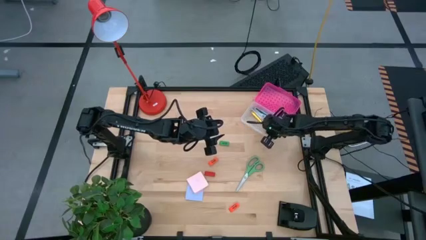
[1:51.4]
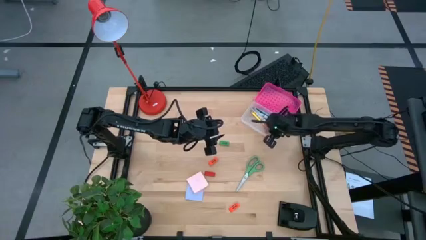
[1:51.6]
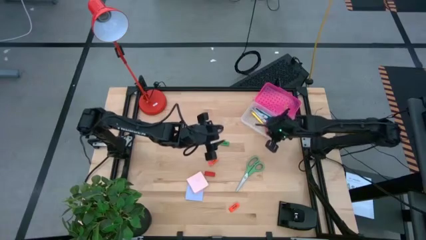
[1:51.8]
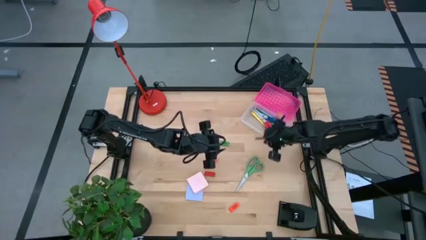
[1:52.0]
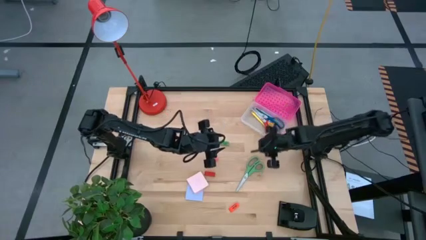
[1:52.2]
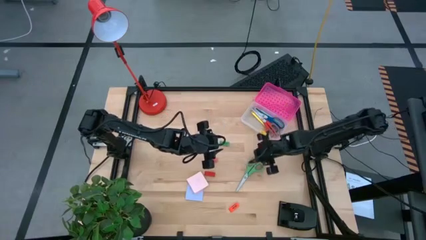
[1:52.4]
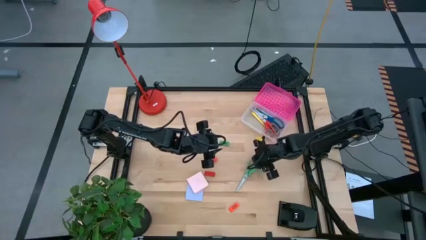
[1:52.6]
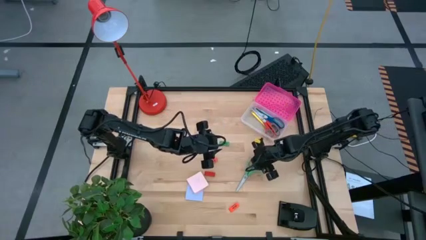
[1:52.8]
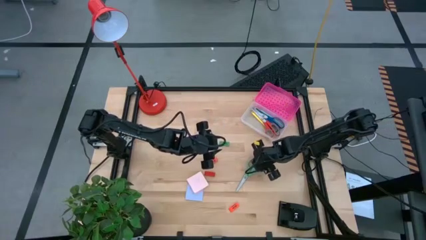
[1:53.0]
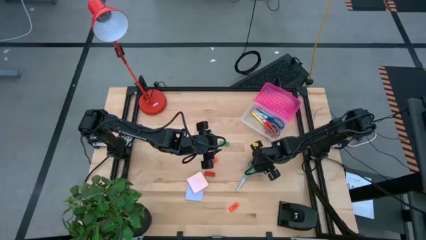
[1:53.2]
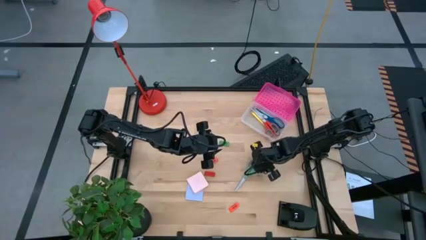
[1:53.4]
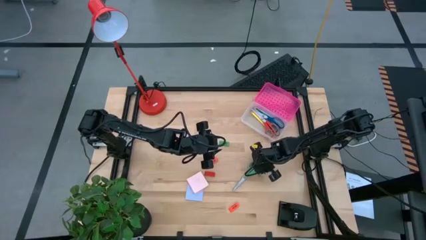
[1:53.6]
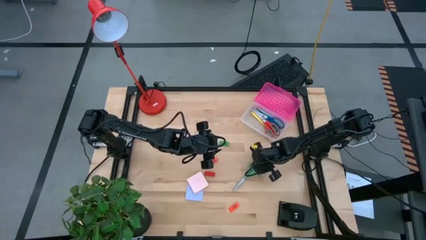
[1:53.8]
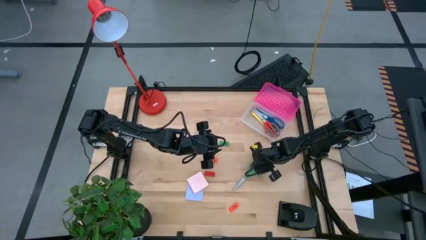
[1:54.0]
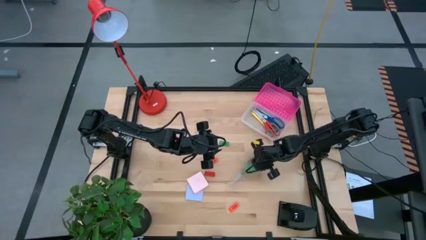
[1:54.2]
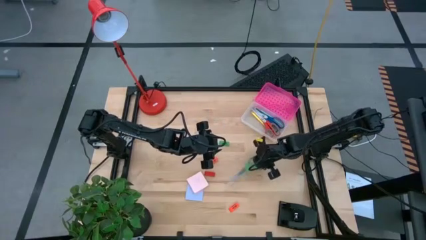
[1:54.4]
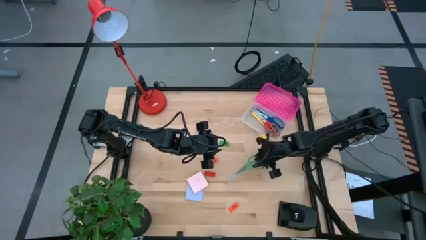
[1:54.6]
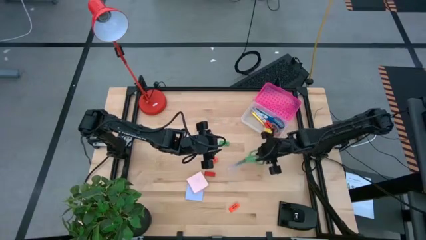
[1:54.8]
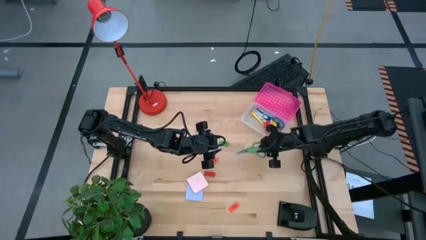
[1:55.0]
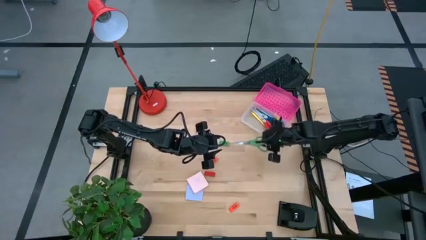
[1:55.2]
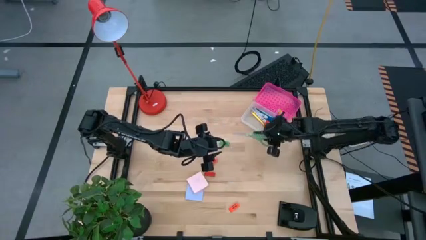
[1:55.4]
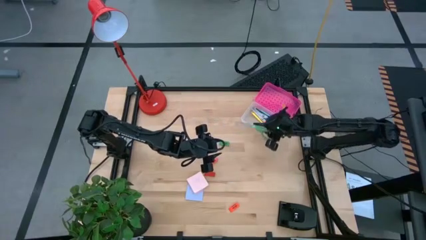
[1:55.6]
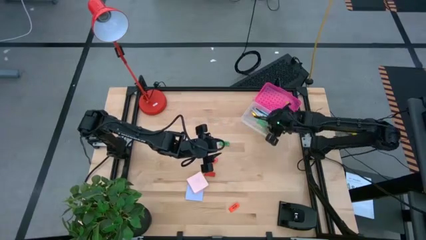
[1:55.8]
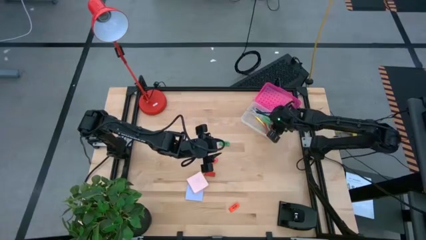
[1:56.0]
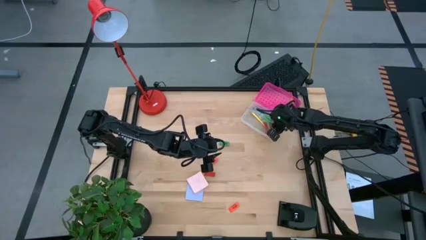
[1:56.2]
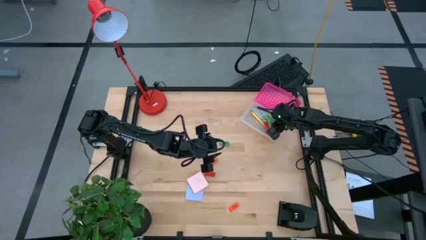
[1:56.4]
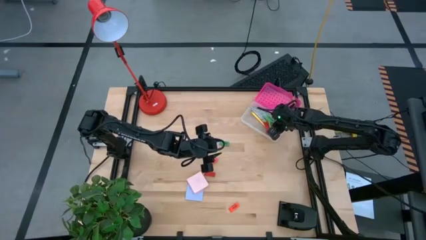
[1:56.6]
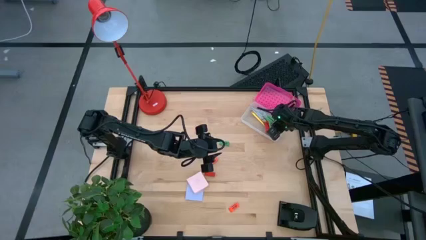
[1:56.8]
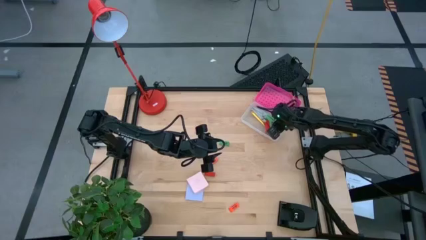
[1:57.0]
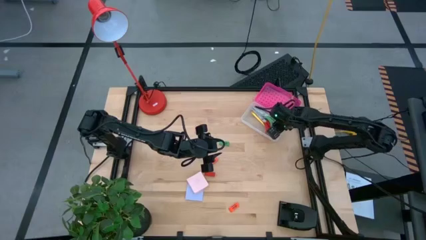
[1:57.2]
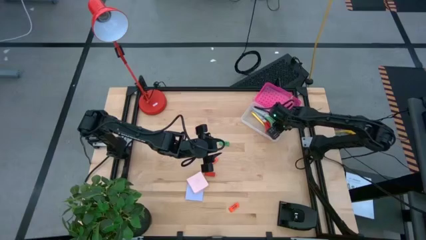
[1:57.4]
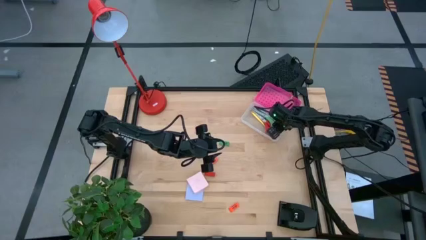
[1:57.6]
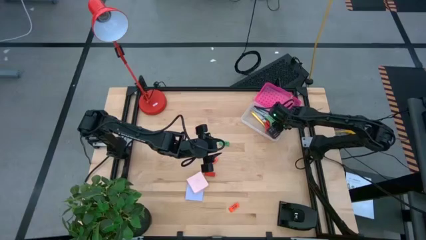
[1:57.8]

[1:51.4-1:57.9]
Task: Pack school essentials
Put the green scissors into the supply box

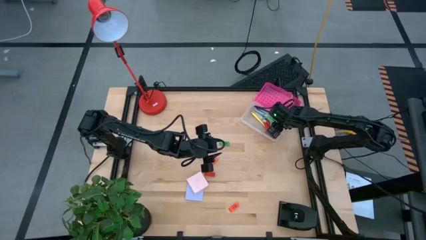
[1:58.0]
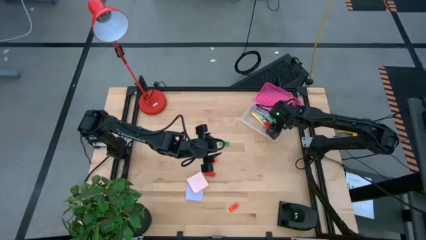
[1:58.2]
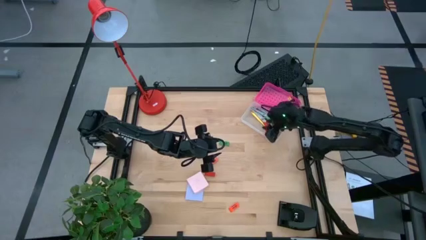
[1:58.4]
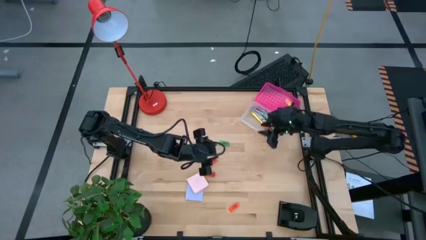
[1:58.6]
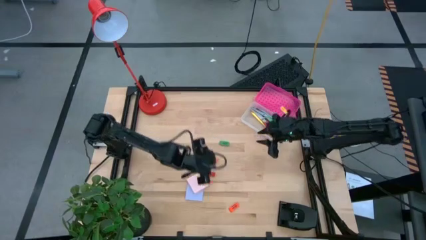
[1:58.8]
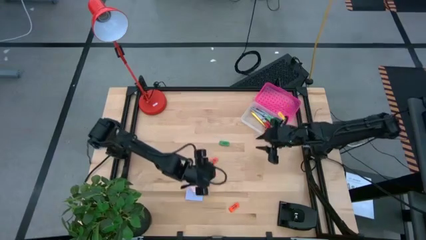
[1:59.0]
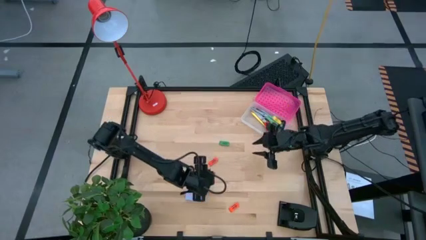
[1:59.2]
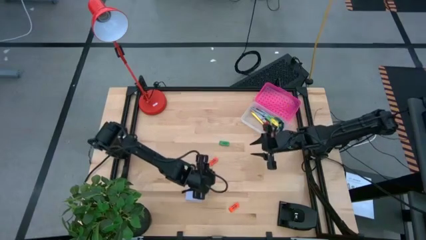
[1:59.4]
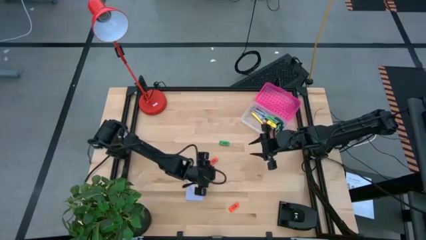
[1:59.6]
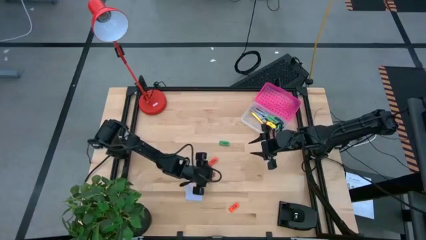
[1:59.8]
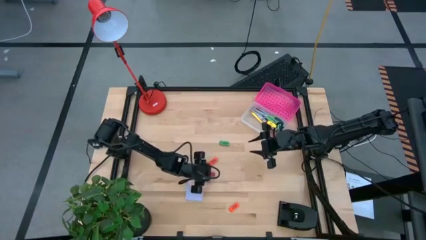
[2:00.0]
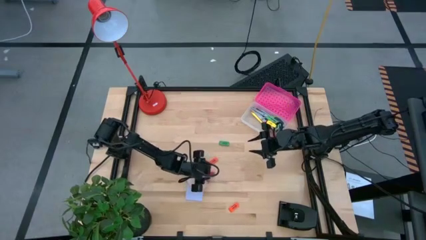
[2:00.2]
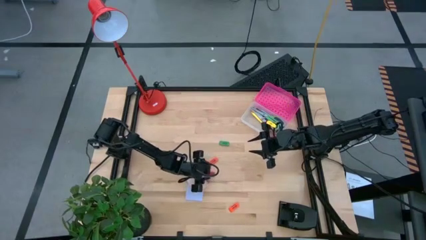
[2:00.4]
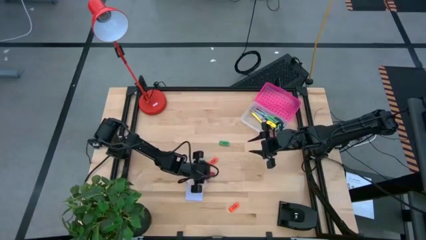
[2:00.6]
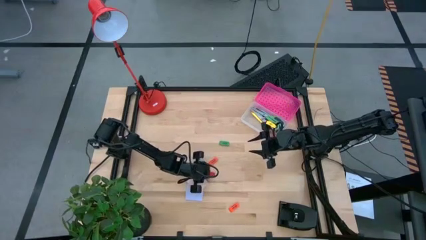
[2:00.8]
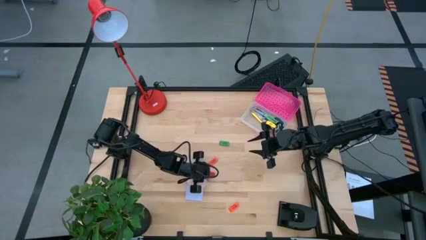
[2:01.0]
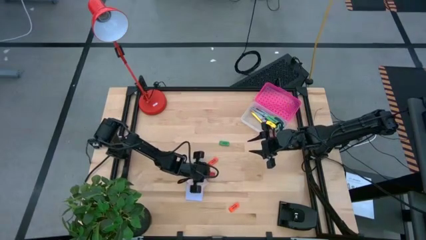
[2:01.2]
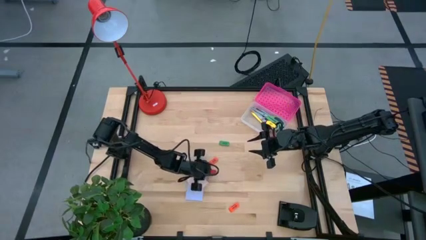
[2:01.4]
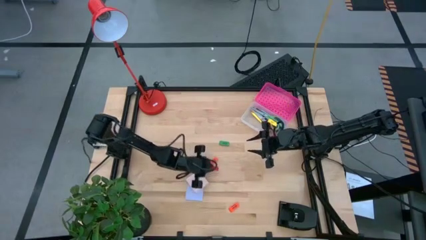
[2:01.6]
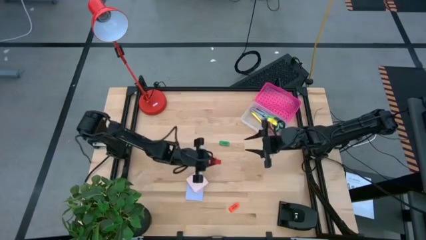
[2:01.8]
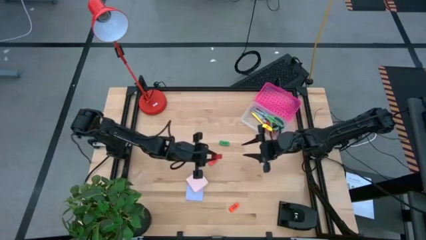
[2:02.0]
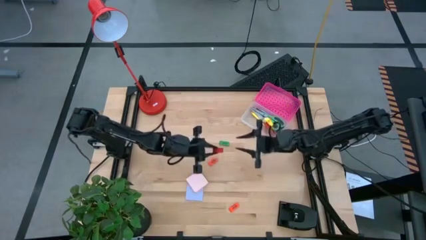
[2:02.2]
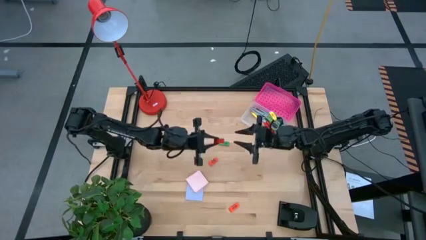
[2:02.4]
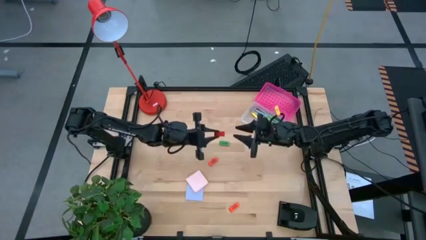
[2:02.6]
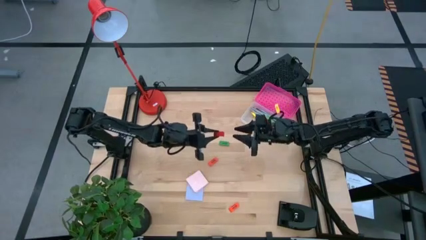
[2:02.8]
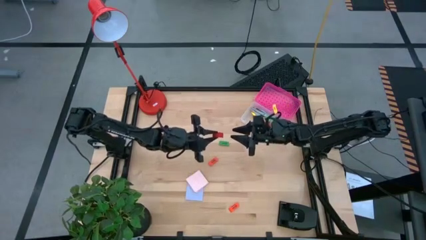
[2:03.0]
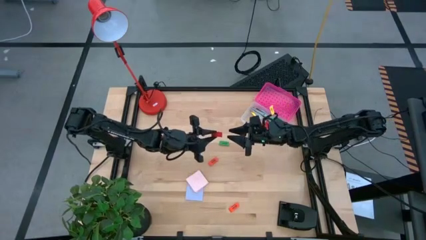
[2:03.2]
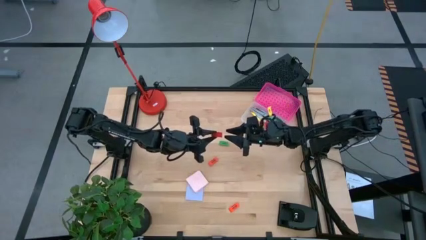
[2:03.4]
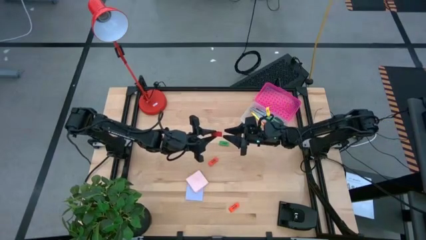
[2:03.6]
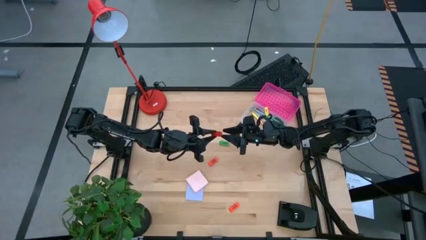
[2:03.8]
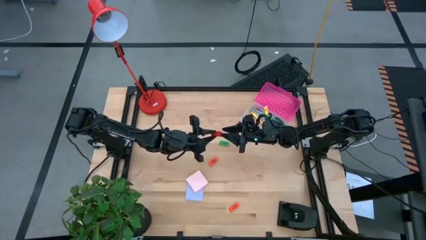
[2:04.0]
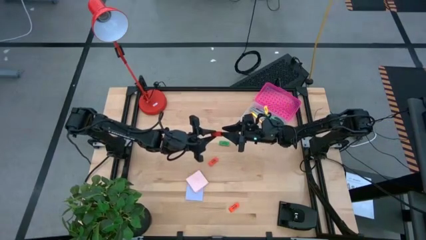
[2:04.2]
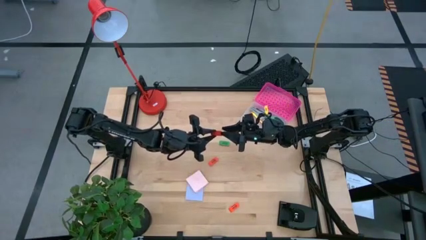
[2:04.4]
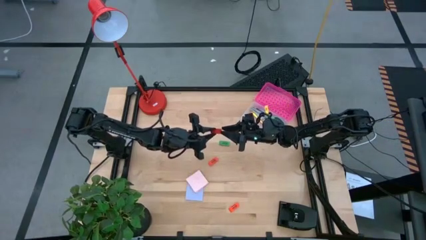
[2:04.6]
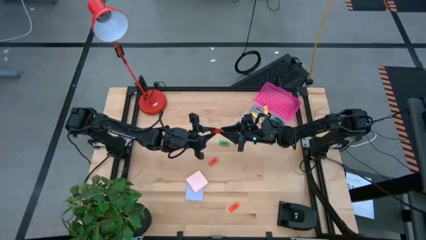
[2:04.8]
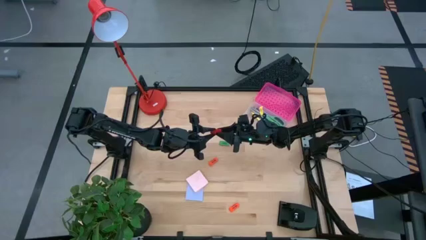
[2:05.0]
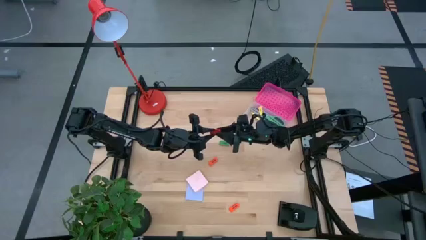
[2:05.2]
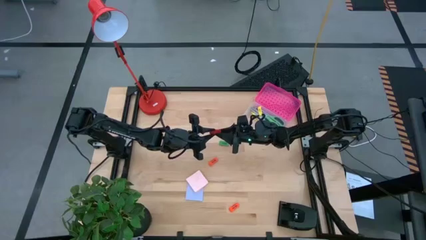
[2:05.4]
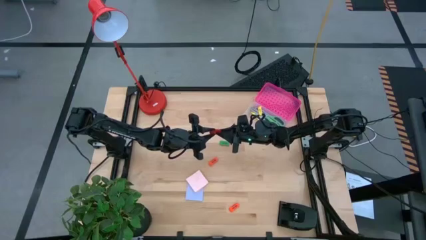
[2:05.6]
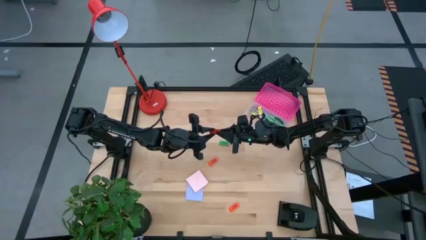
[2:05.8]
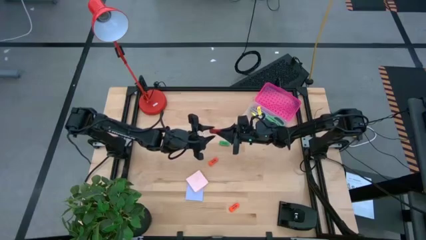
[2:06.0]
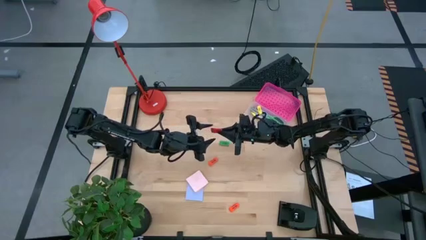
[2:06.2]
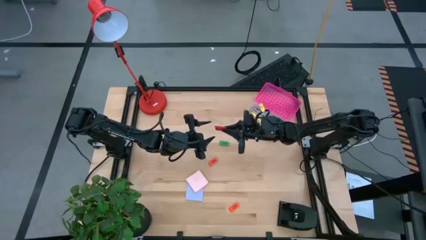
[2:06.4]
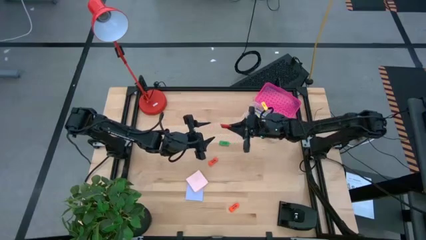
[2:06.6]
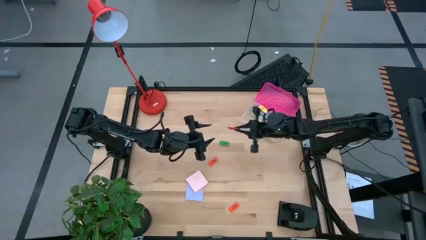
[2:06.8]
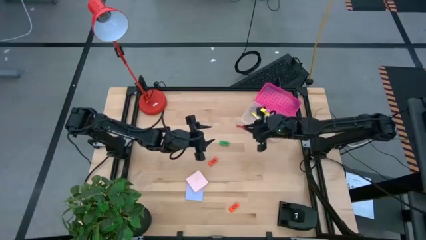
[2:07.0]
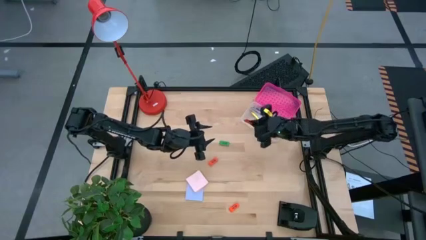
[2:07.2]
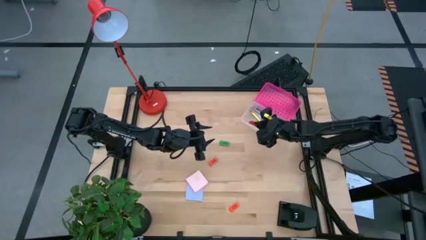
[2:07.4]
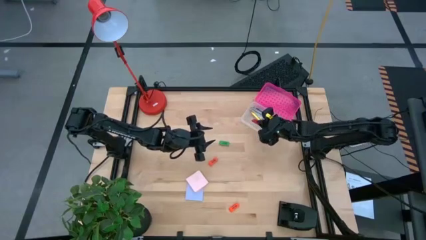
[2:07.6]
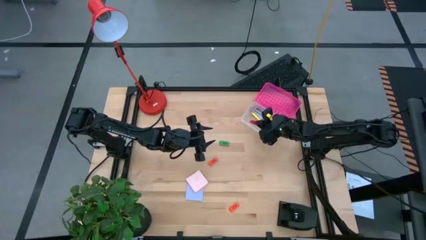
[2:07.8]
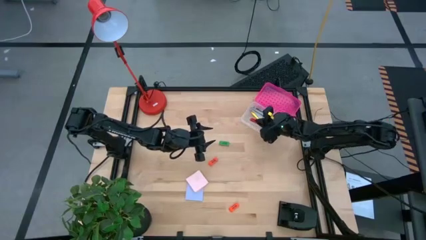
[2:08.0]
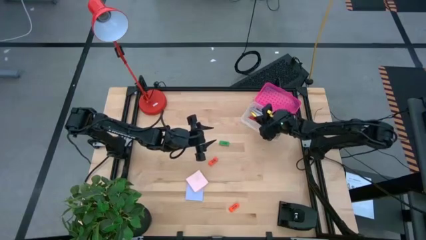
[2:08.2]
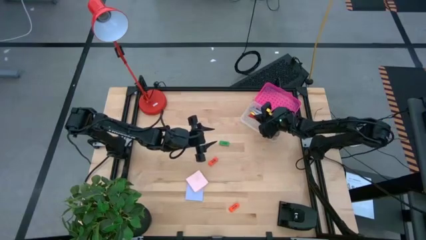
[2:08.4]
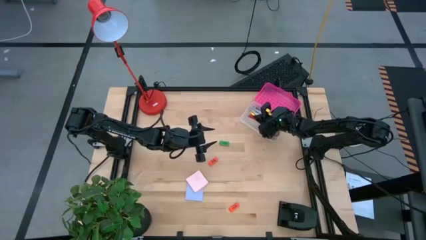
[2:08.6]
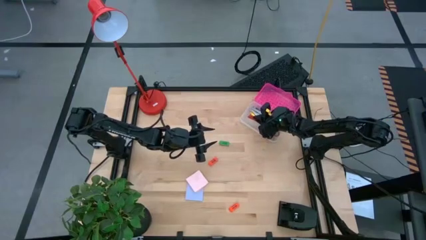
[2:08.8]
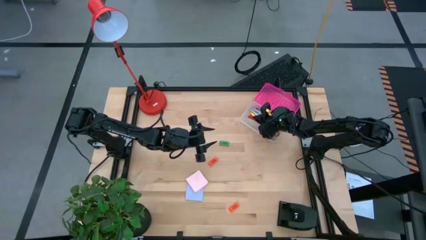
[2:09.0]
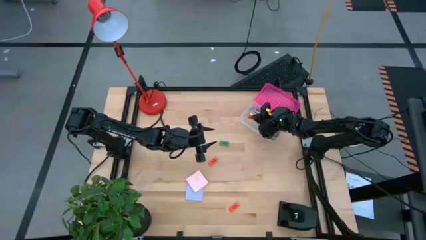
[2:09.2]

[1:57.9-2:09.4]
Put the red eraser into the supply box
